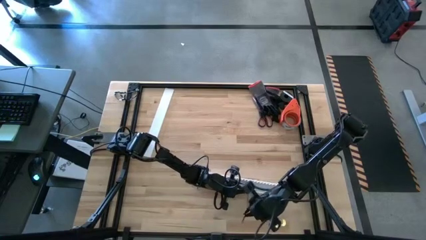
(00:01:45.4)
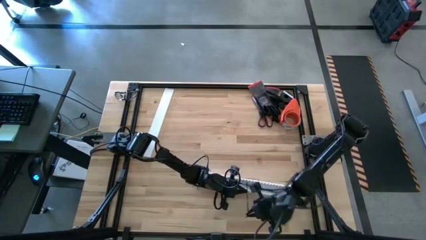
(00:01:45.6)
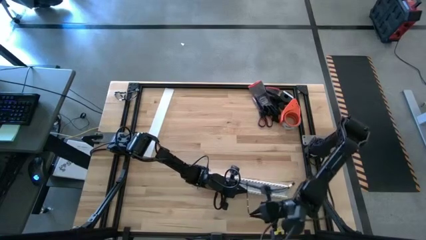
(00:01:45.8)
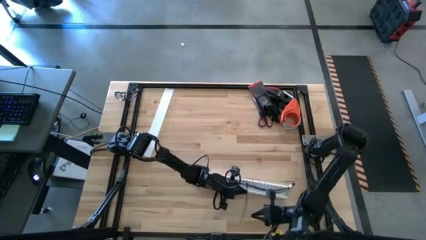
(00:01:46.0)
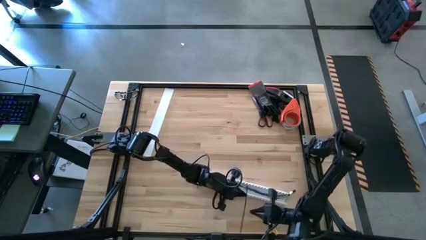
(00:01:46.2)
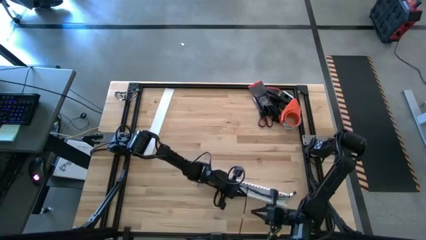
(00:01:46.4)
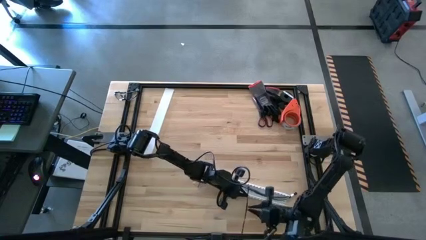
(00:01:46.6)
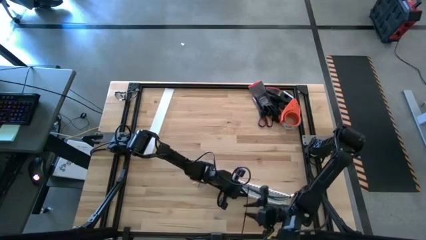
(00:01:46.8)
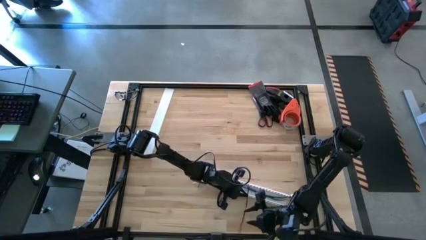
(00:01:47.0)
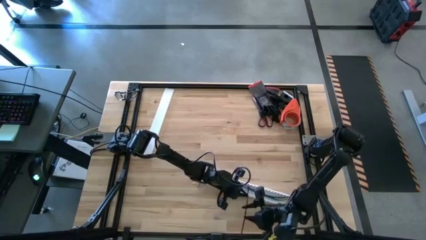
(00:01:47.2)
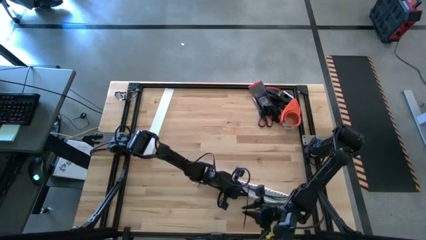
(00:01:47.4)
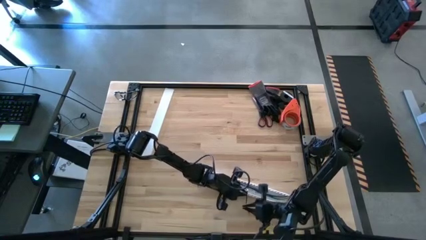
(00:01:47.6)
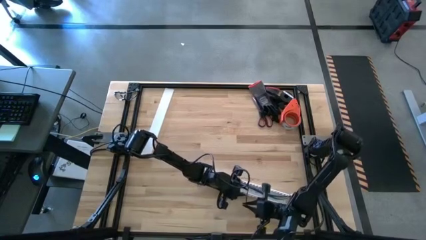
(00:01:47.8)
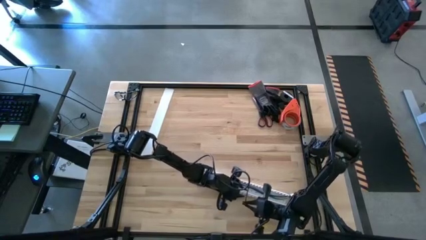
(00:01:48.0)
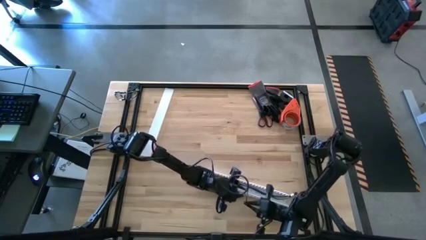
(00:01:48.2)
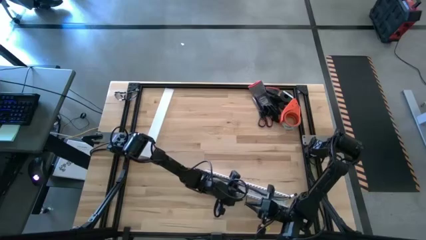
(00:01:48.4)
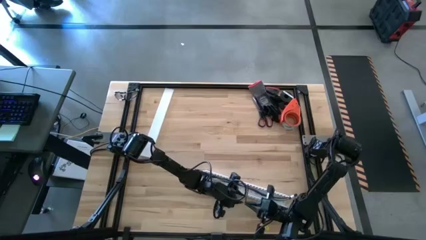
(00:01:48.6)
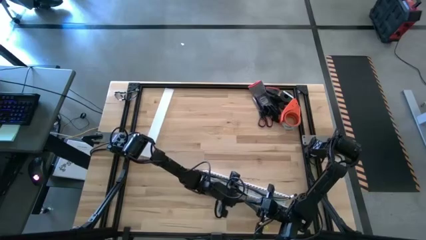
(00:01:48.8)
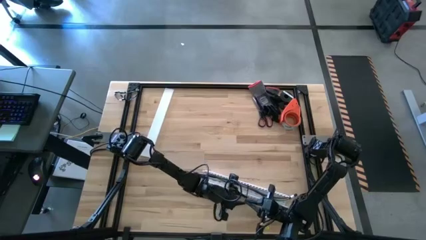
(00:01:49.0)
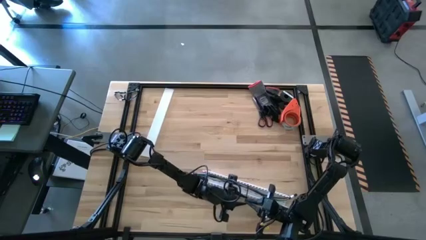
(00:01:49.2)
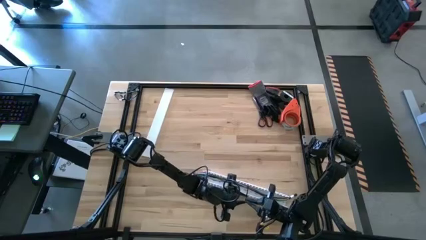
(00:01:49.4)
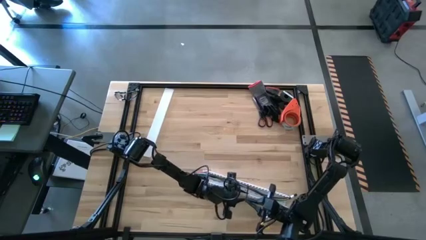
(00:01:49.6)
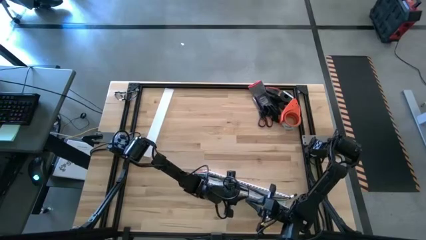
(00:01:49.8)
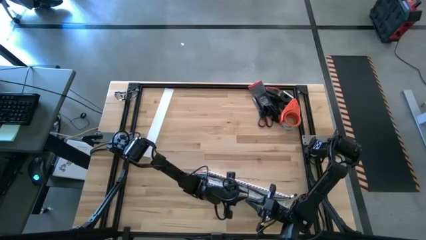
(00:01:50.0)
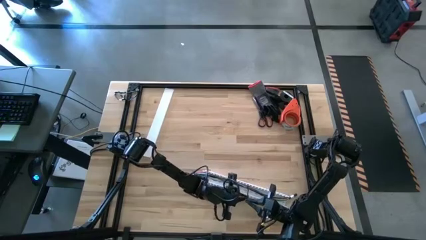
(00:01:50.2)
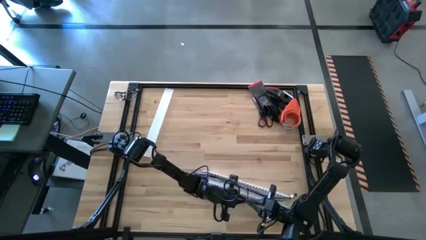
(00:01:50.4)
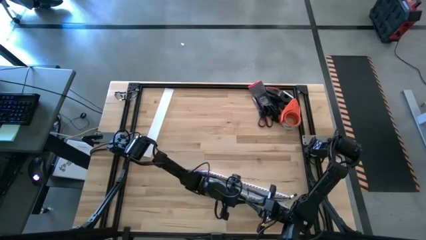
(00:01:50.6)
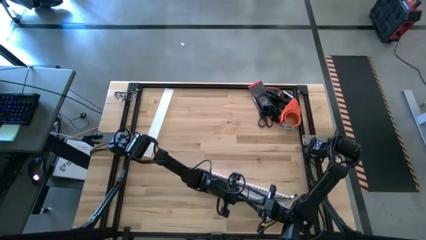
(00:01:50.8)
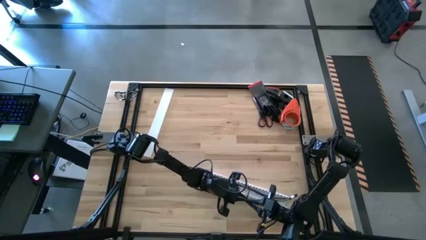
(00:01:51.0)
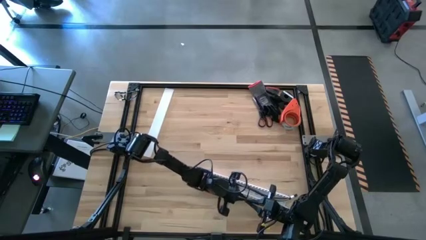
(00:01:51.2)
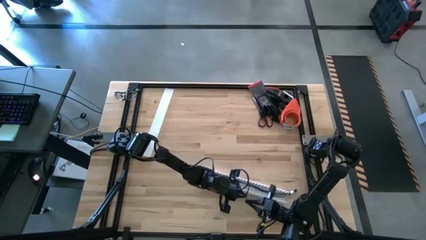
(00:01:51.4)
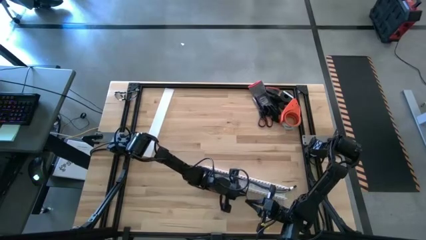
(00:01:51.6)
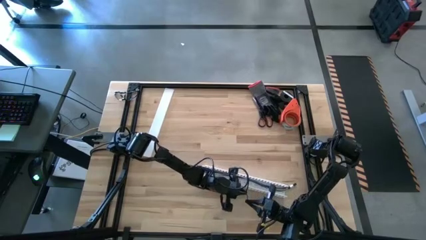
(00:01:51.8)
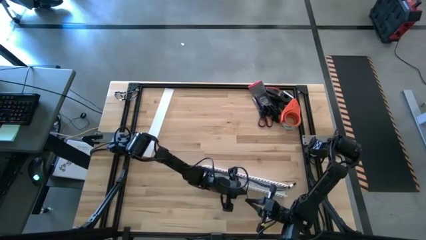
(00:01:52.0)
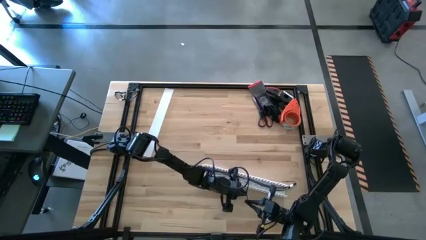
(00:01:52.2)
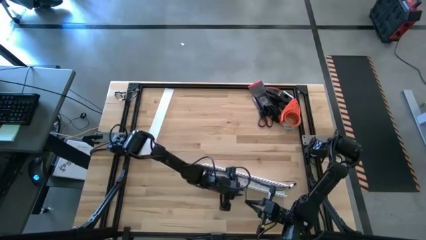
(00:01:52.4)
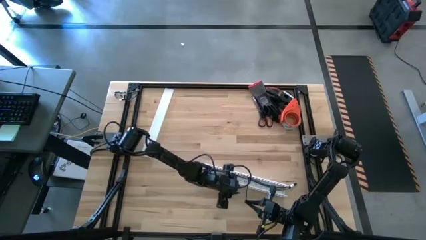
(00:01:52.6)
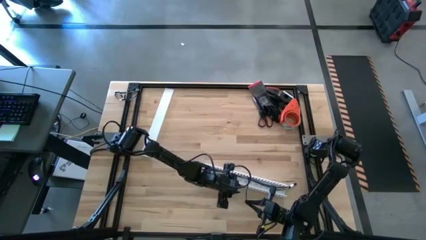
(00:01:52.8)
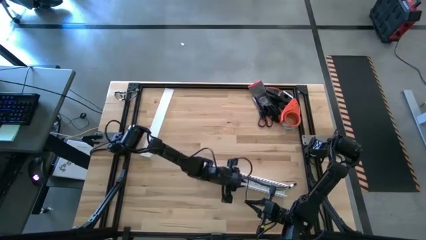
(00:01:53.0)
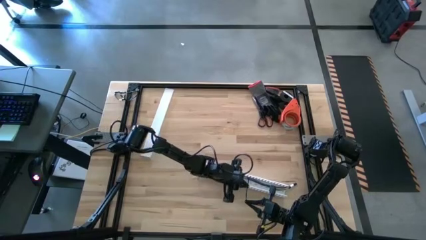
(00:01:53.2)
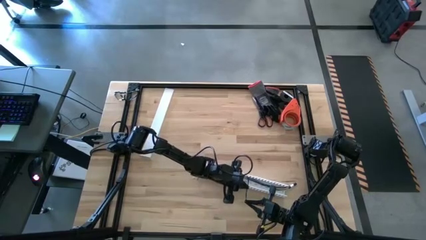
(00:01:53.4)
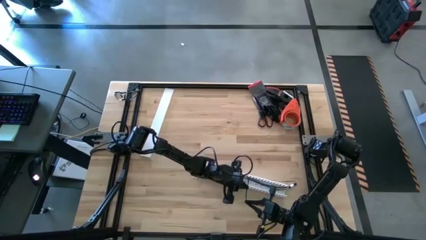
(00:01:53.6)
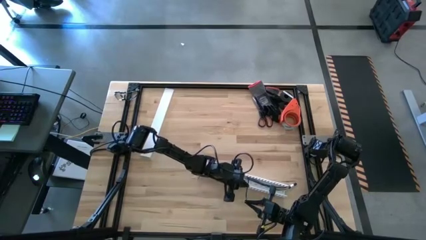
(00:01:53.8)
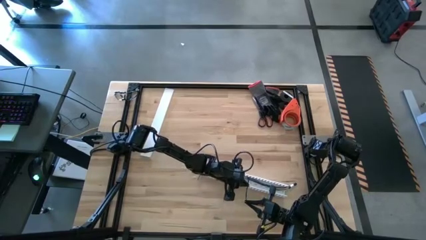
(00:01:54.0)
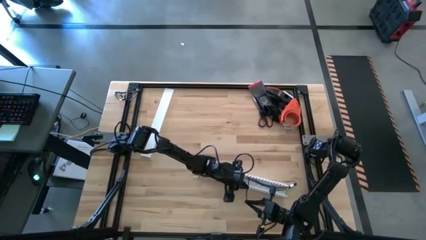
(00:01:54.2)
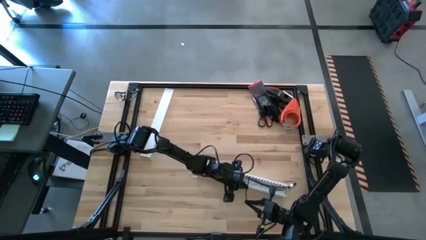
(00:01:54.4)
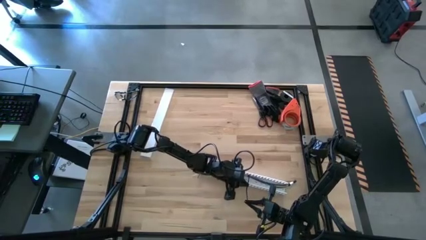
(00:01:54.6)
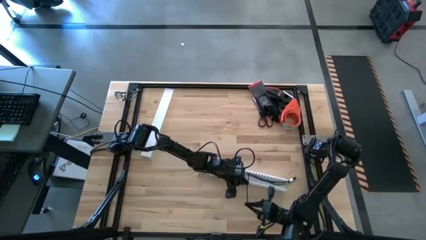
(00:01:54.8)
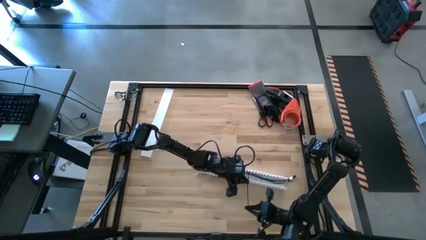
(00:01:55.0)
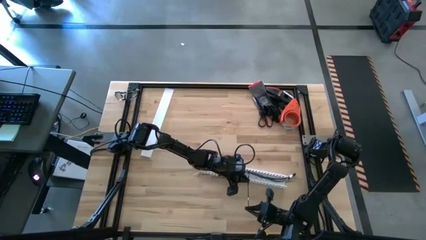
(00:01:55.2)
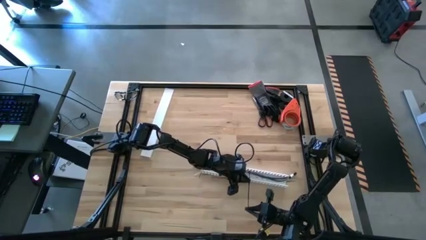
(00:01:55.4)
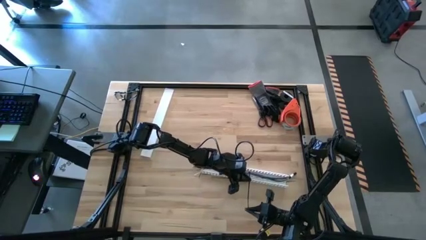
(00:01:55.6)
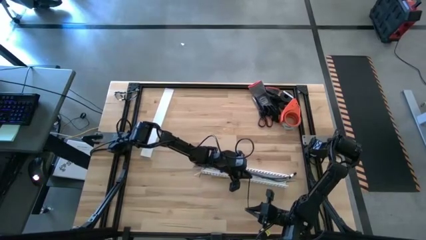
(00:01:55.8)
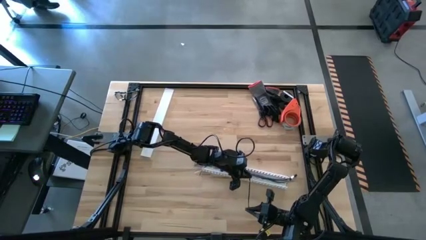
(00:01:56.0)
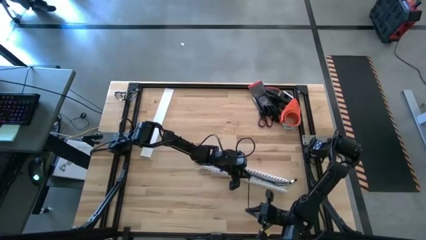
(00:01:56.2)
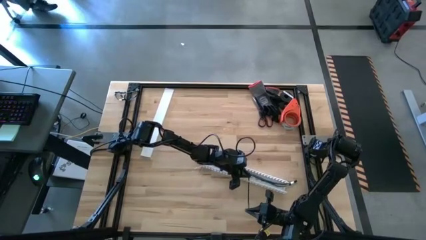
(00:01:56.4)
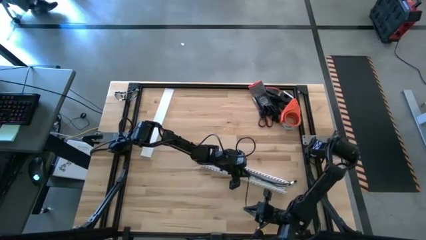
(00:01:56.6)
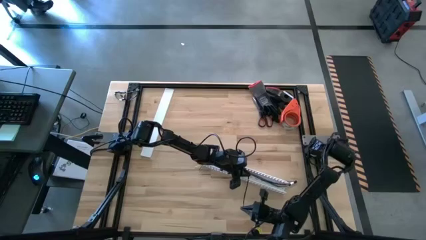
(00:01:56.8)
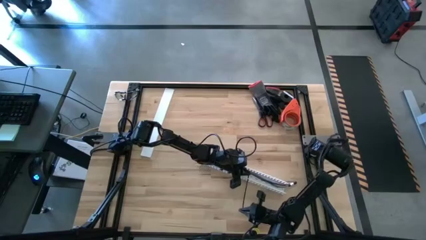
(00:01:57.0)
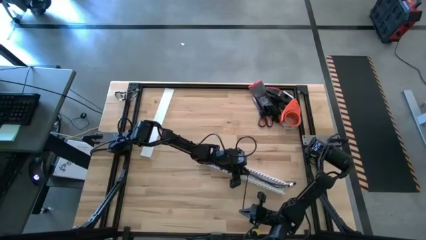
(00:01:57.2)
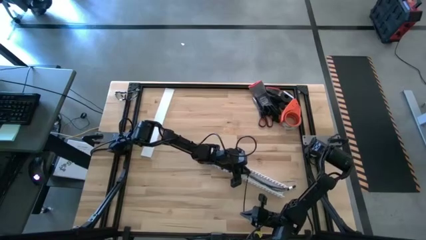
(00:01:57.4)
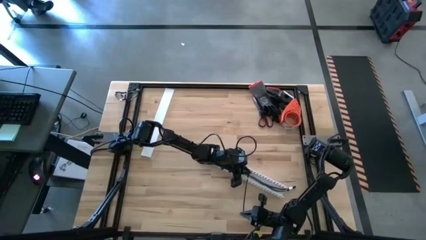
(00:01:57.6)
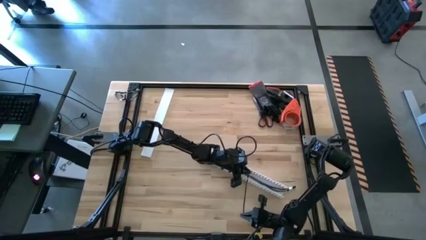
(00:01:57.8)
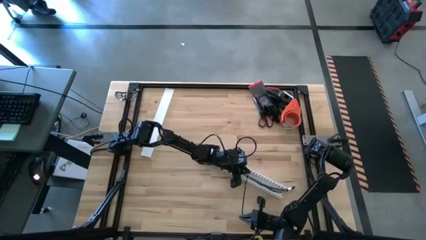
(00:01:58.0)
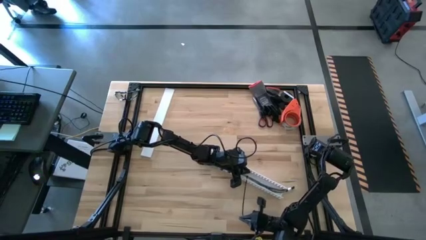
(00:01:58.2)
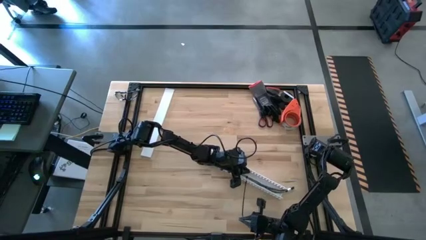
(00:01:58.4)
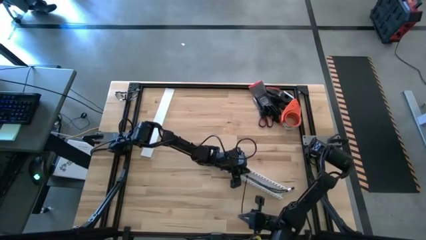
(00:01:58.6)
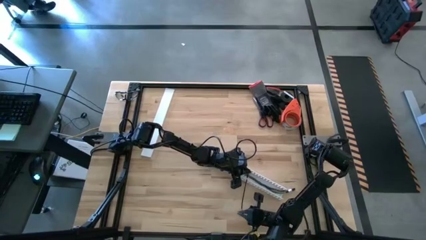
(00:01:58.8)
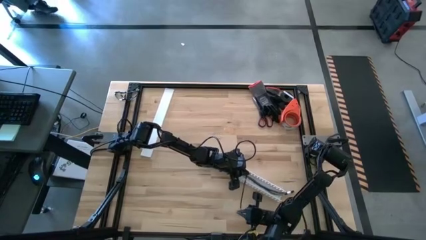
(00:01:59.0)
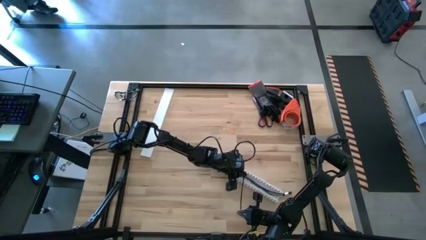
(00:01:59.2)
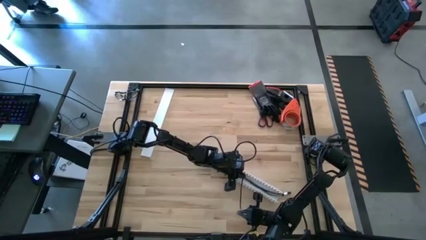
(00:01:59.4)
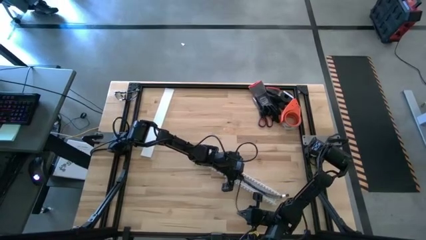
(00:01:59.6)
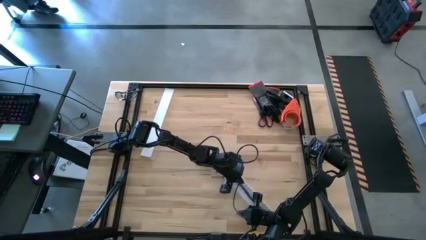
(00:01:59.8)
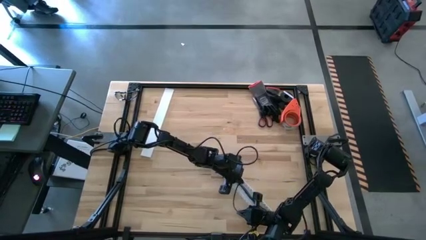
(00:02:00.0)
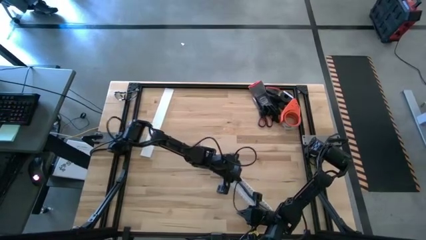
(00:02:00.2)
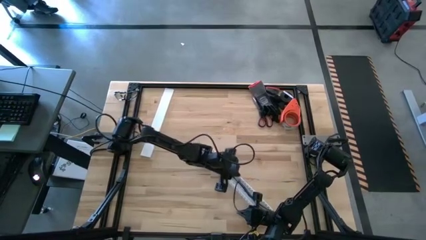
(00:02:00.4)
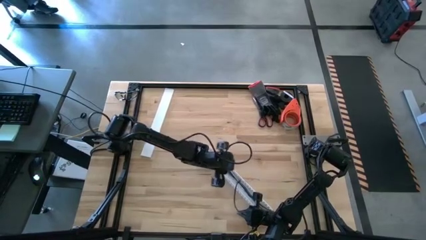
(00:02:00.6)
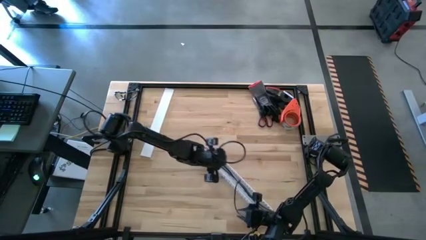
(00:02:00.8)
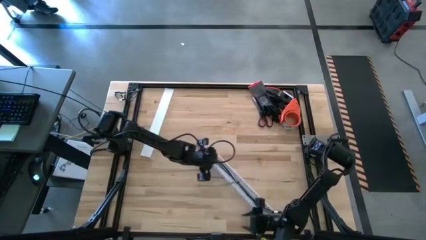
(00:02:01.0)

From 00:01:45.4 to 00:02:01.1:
Task: Ziptie cables
Put the colored ziptied cable into the white cable duct
